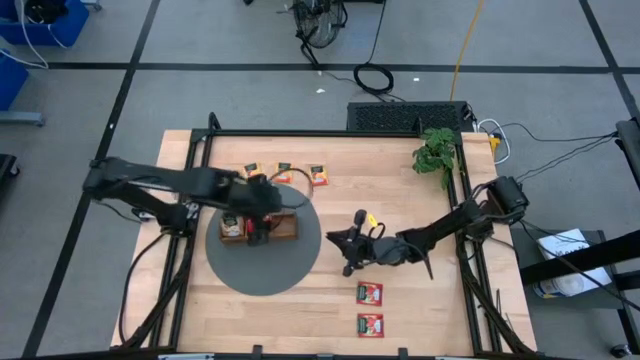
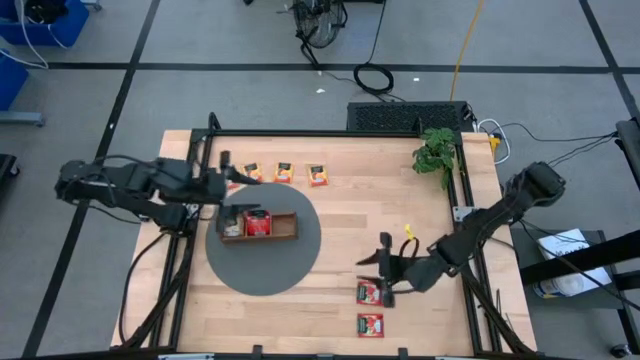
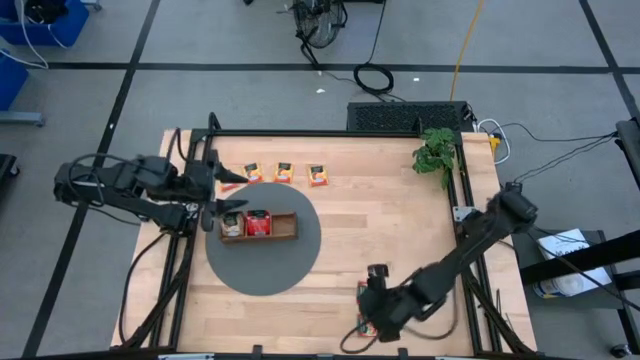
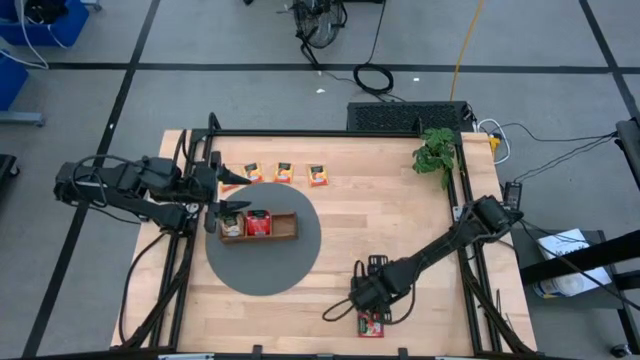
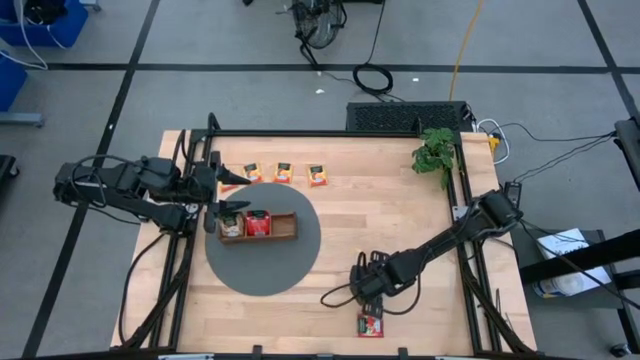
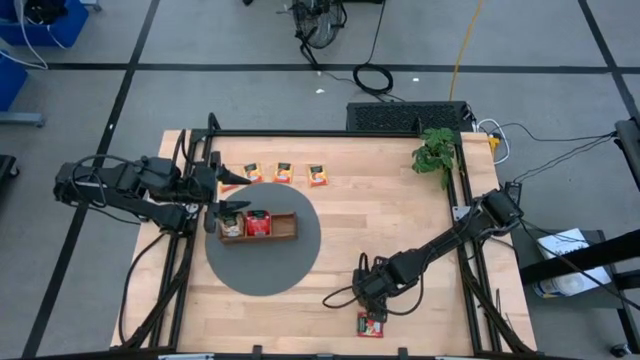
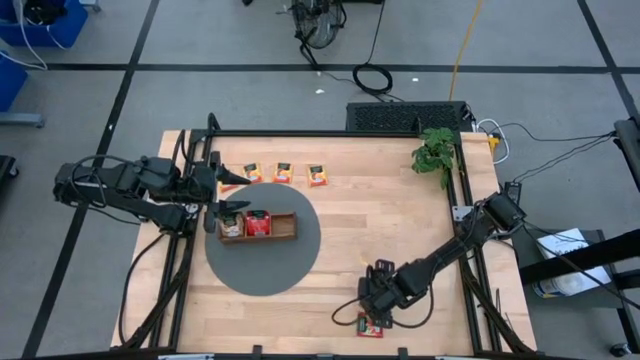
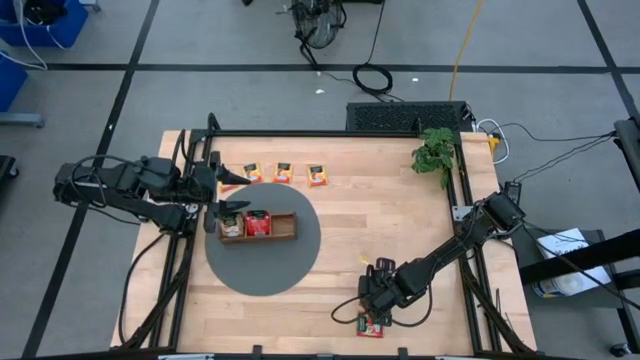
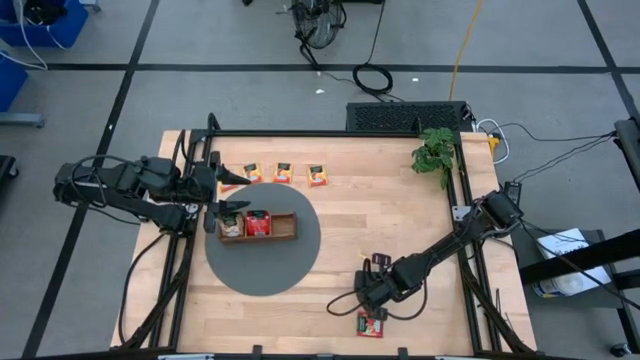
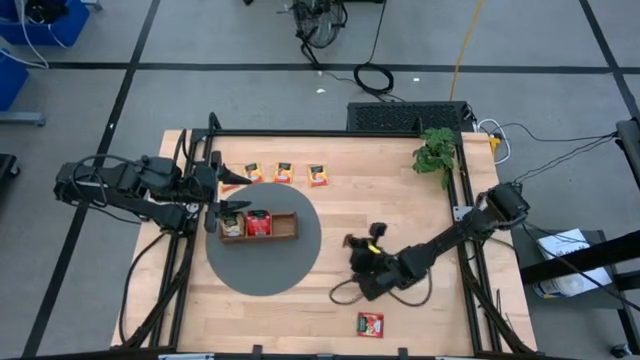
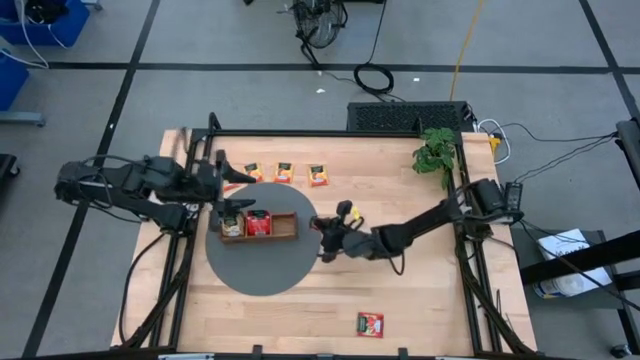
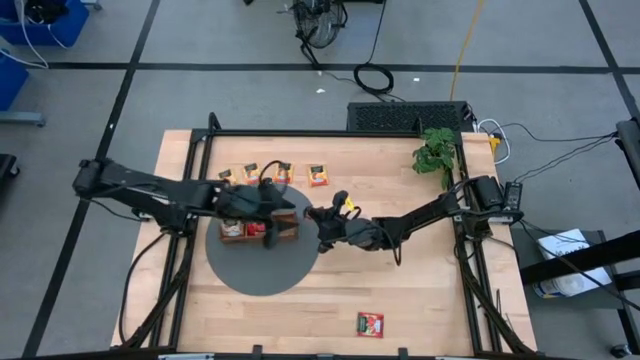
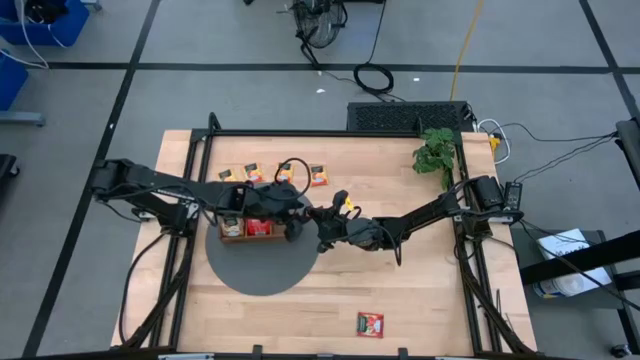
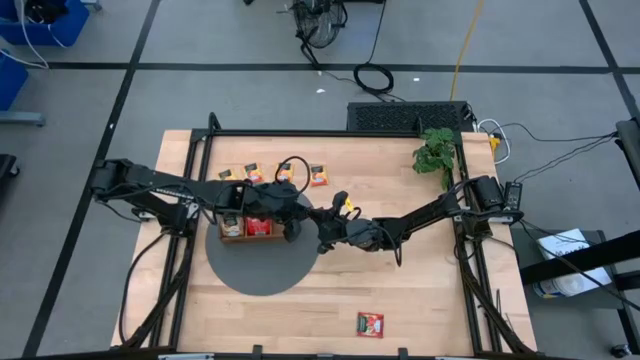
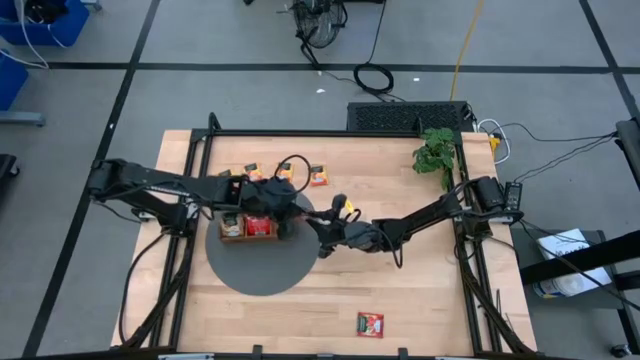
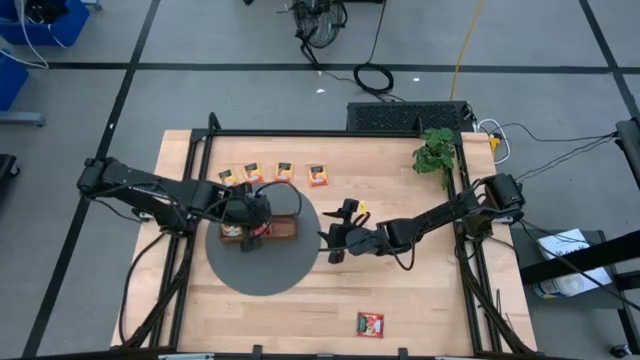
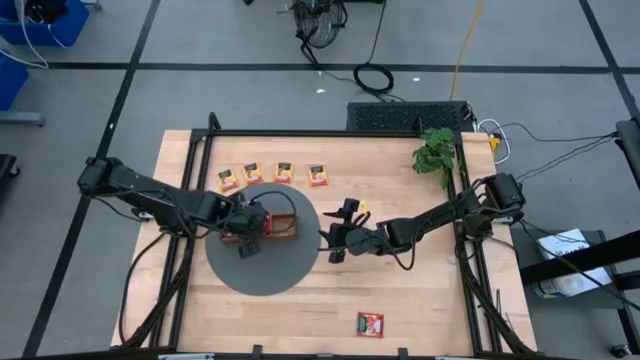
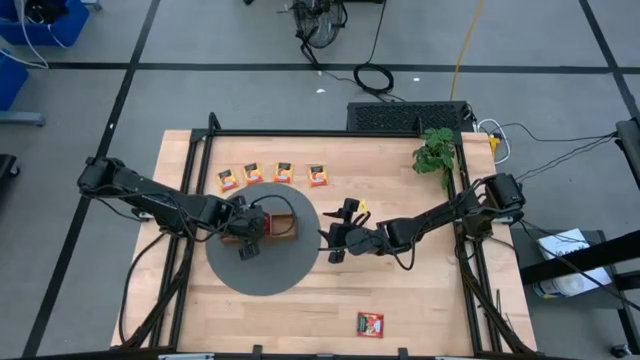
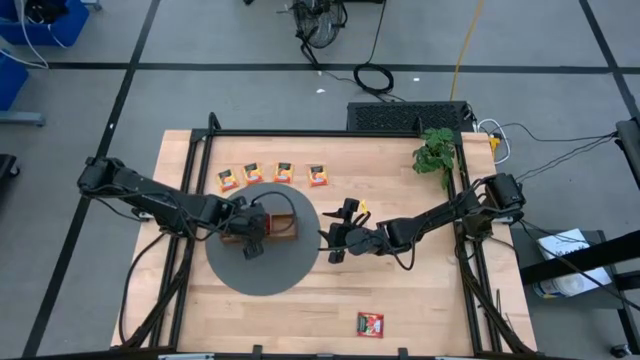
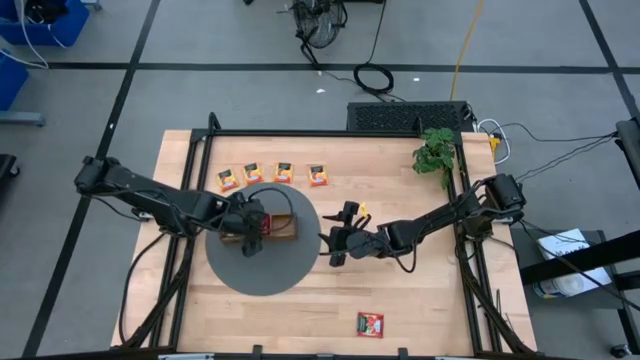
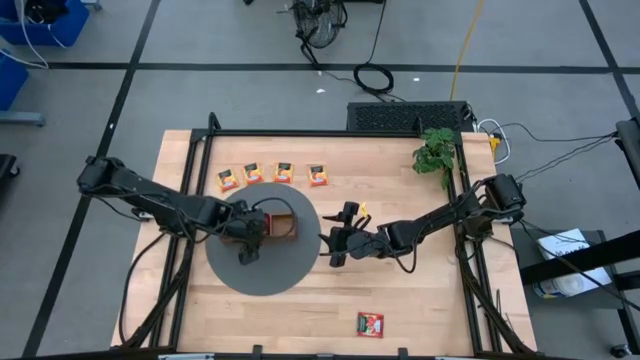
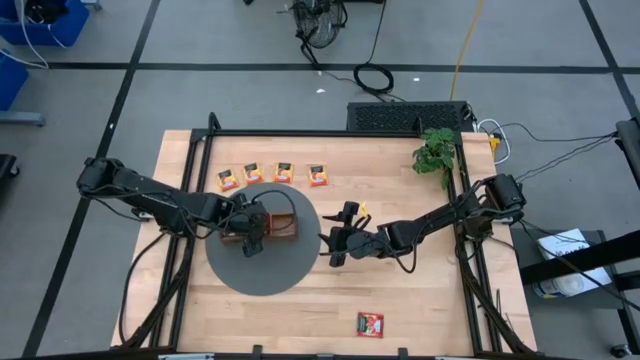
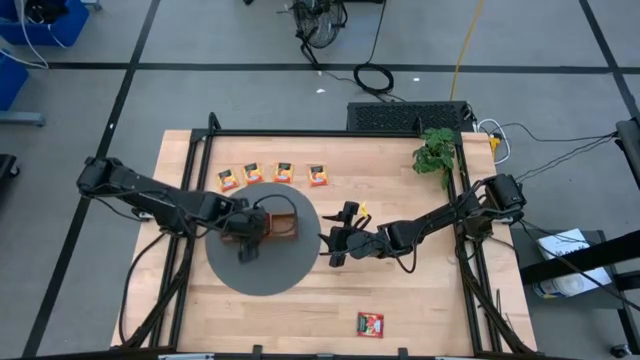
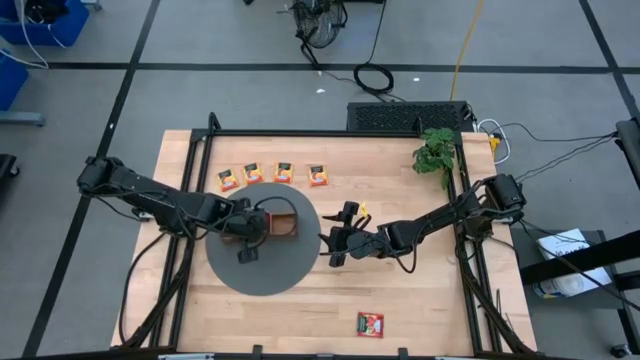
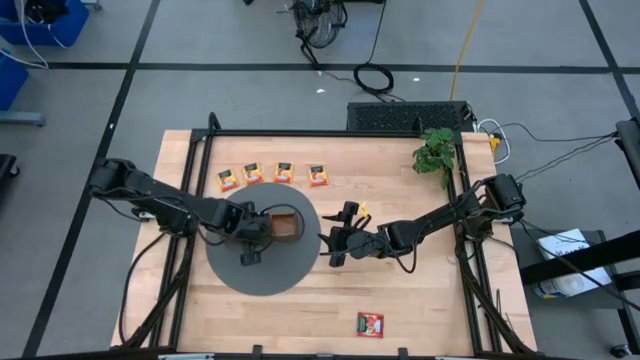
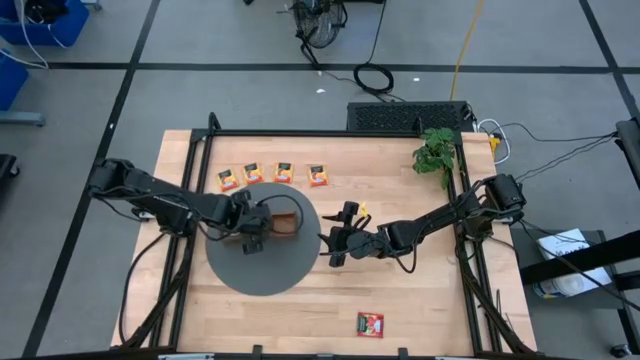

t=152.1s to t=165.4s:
Task: Pick & Place Tea
Put the red tea bag into the middle section of the wooden organizer

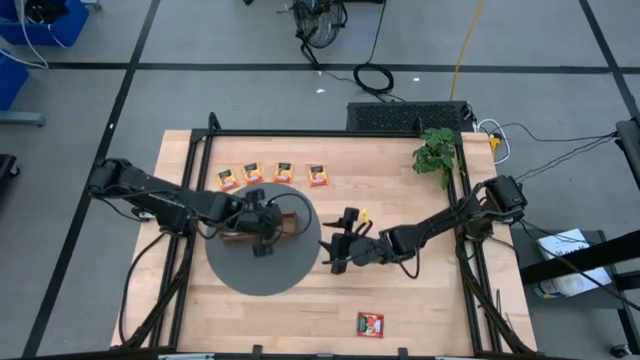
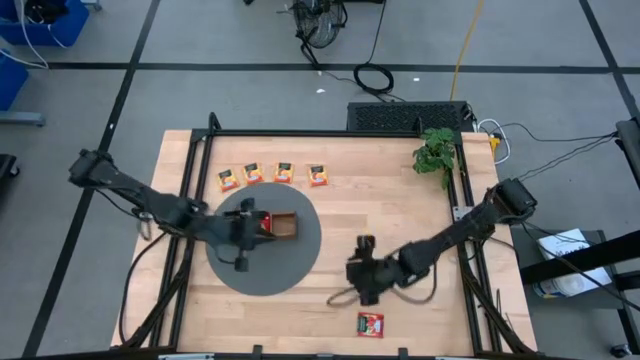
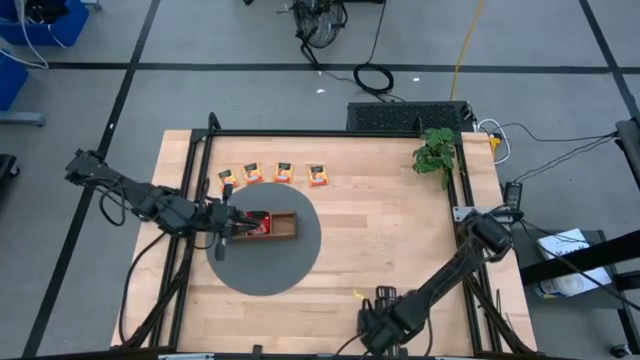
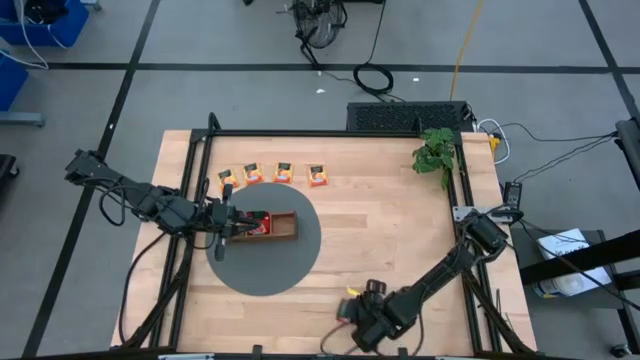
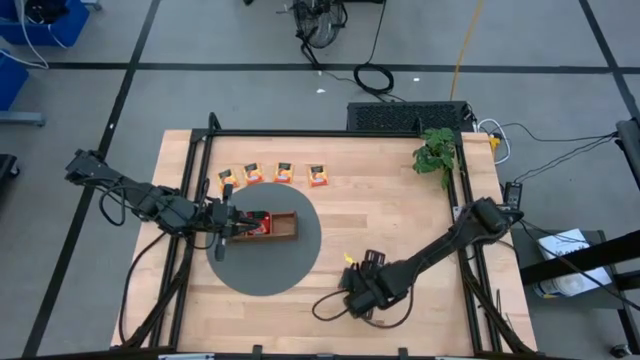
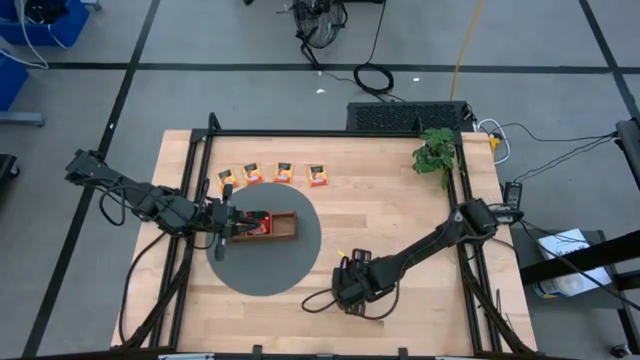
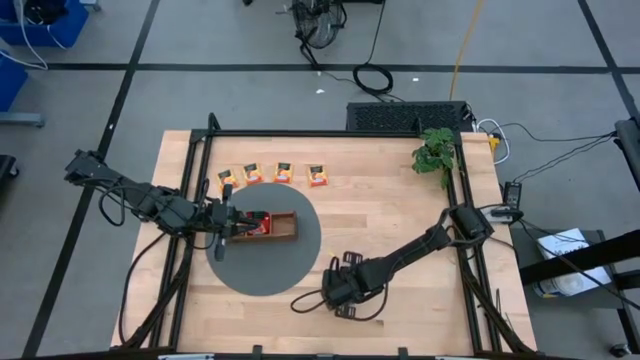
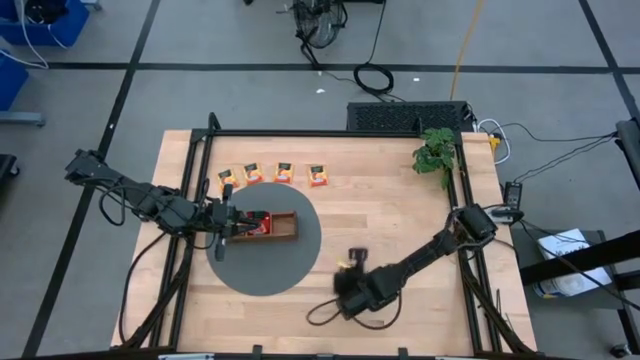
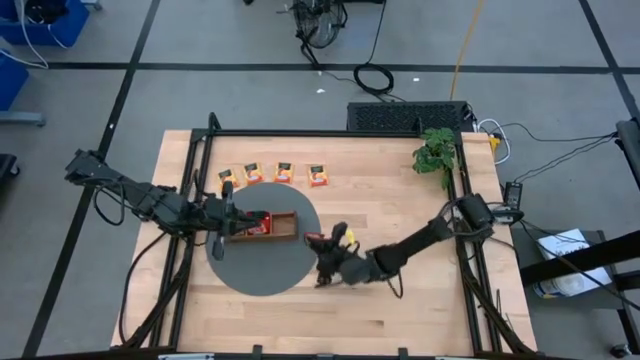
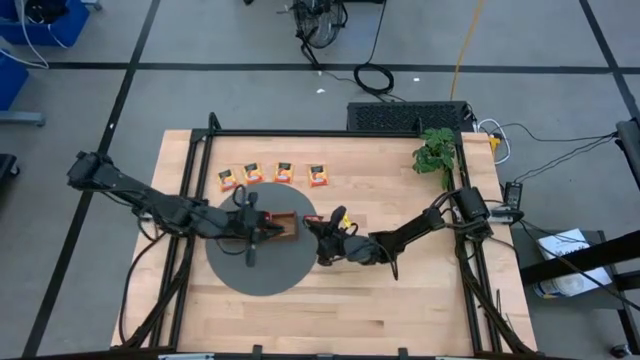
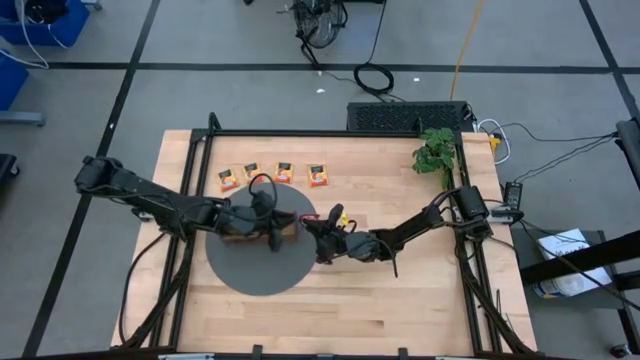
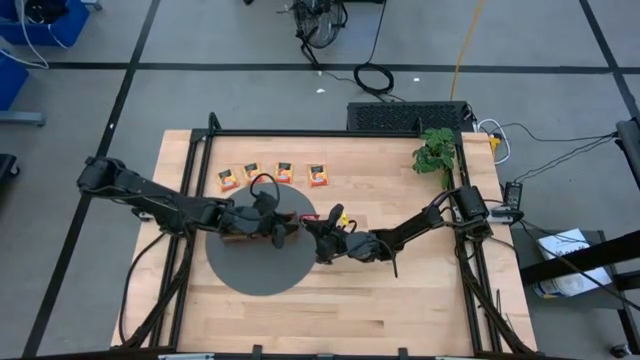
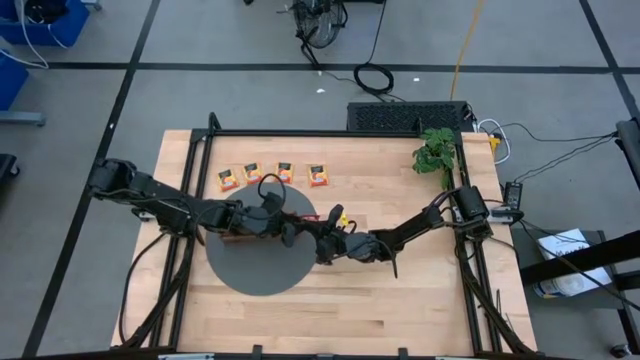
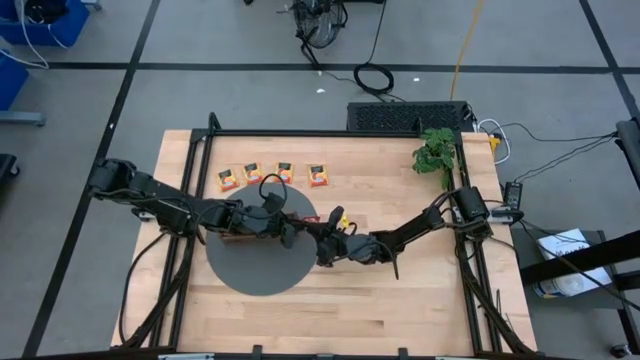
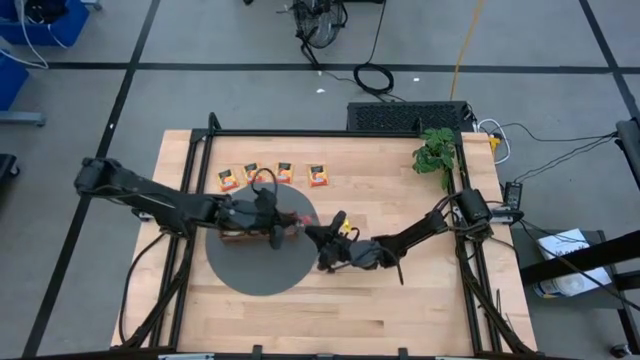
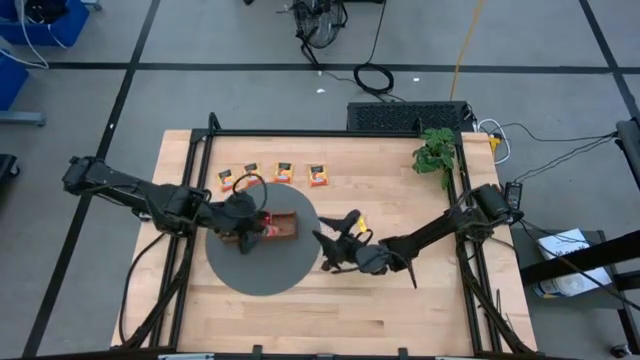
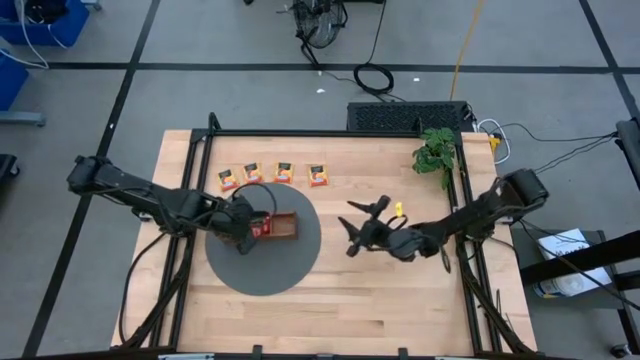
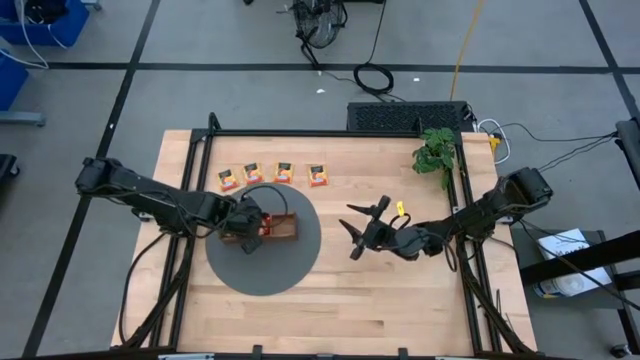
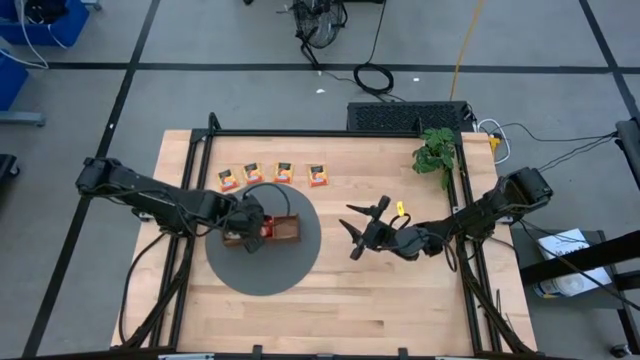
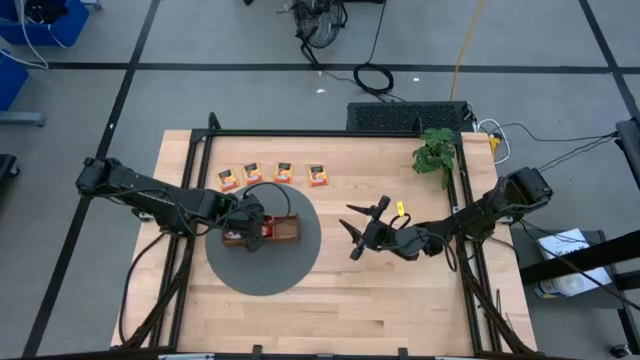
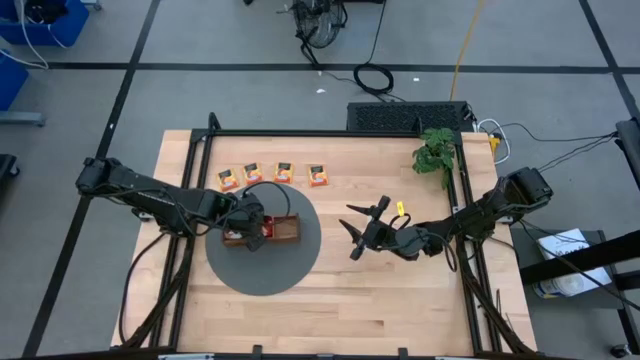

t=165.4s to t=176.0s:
Put the red tea bag into the middle section of the wooden organizer
